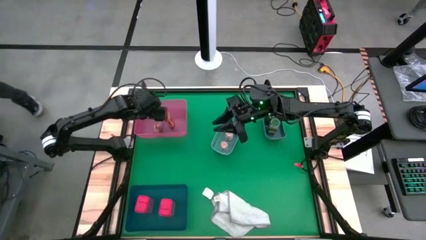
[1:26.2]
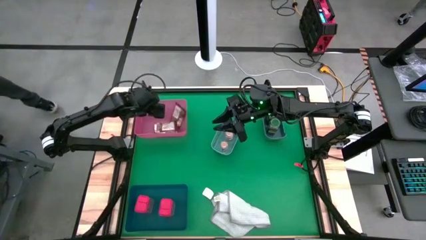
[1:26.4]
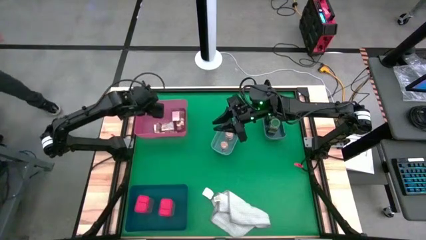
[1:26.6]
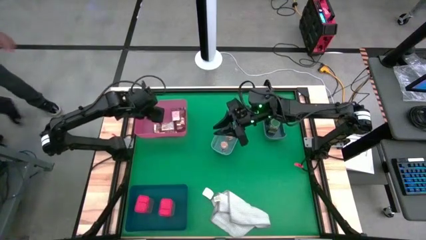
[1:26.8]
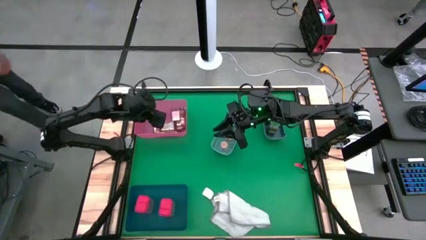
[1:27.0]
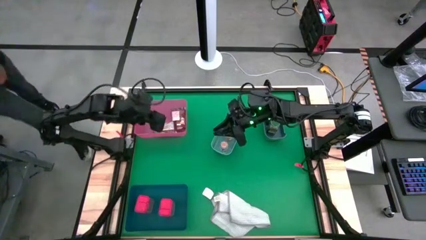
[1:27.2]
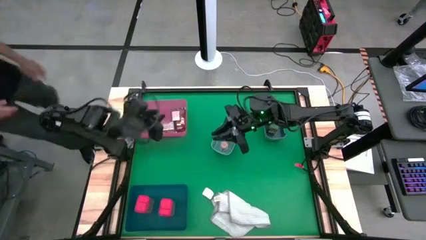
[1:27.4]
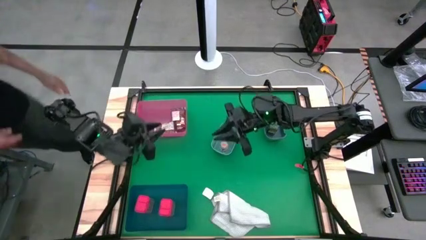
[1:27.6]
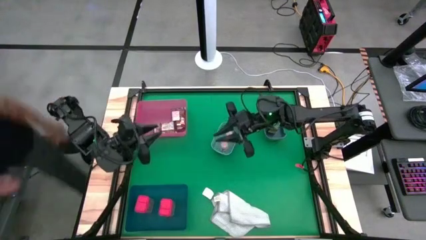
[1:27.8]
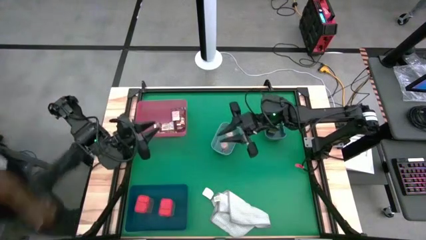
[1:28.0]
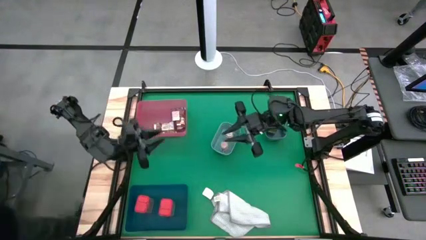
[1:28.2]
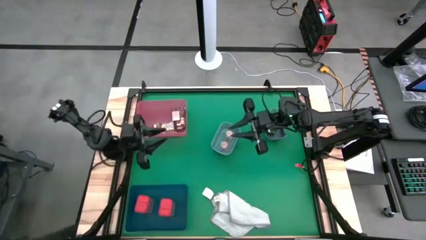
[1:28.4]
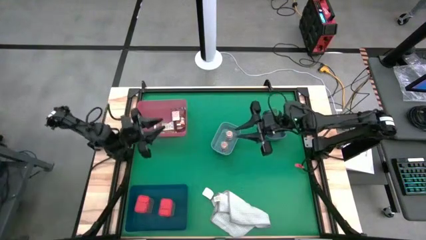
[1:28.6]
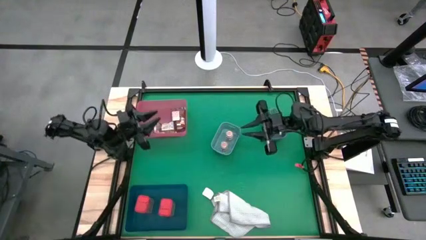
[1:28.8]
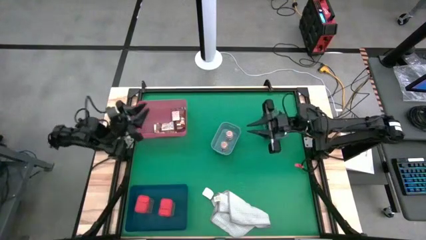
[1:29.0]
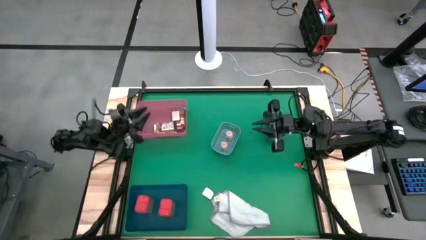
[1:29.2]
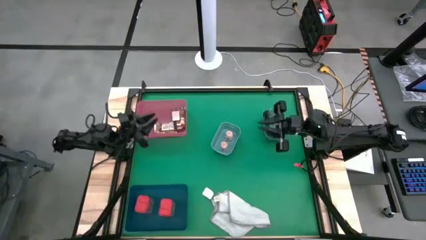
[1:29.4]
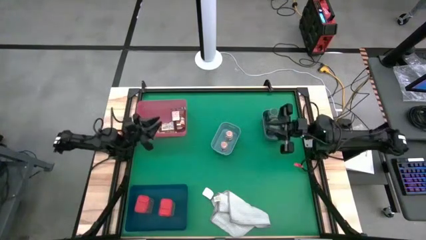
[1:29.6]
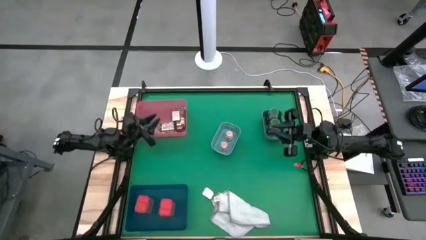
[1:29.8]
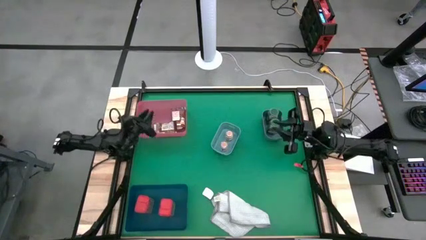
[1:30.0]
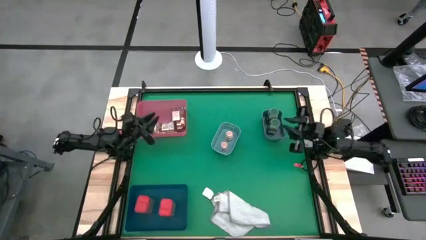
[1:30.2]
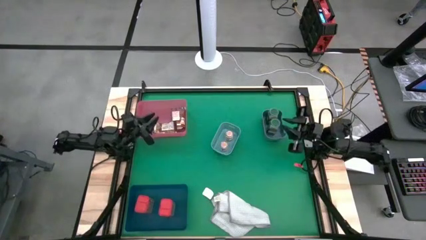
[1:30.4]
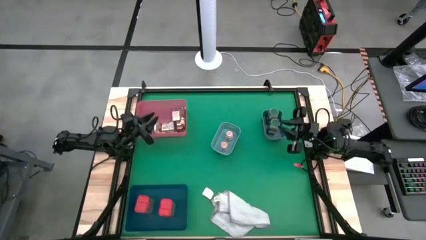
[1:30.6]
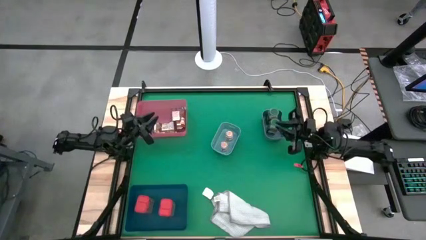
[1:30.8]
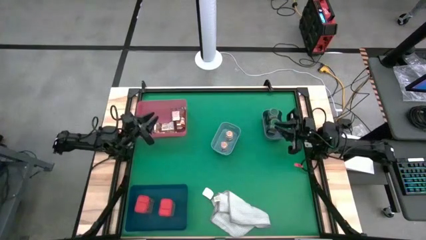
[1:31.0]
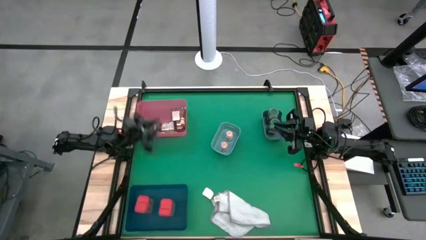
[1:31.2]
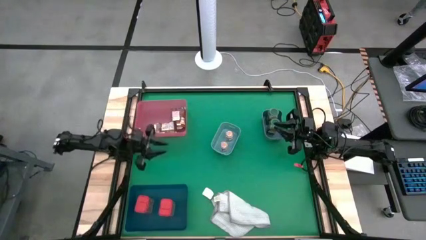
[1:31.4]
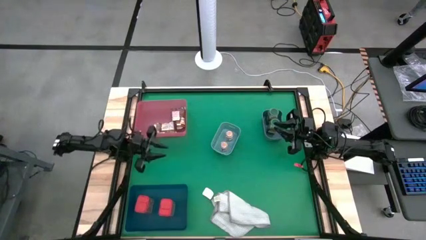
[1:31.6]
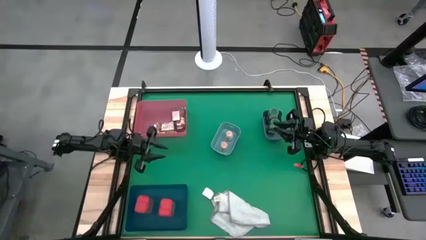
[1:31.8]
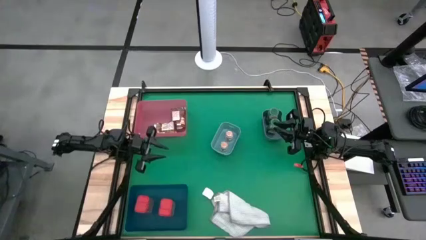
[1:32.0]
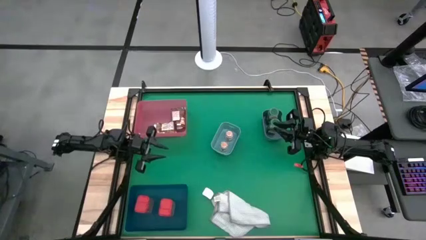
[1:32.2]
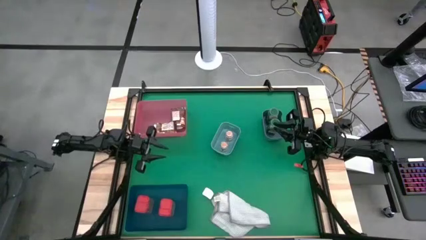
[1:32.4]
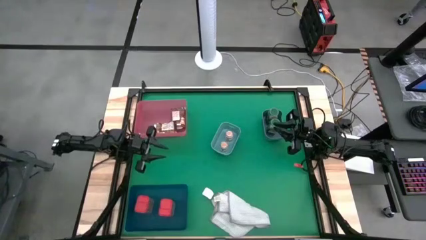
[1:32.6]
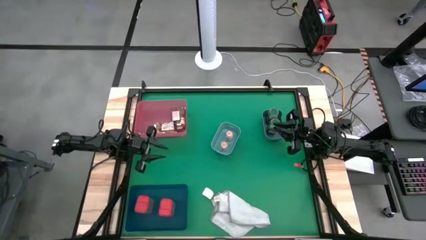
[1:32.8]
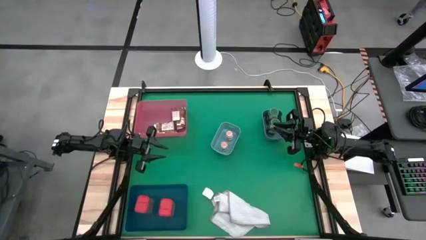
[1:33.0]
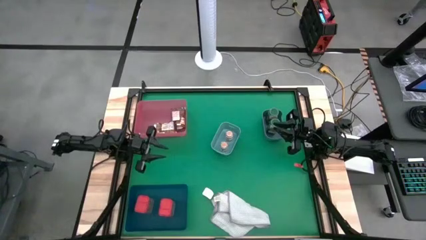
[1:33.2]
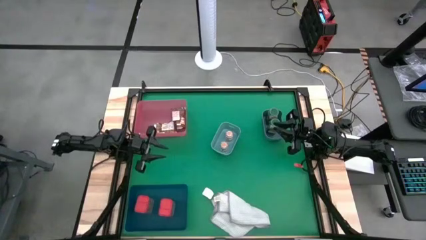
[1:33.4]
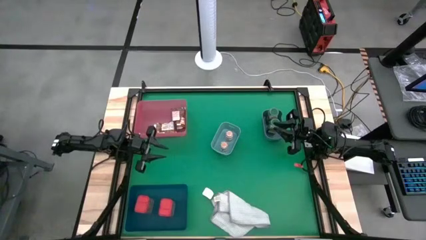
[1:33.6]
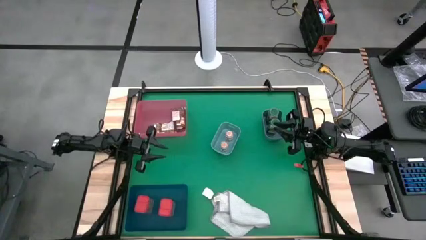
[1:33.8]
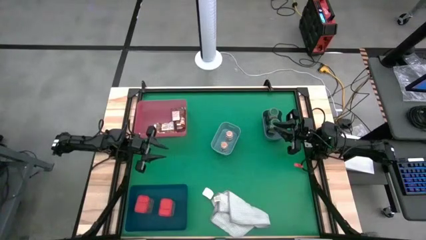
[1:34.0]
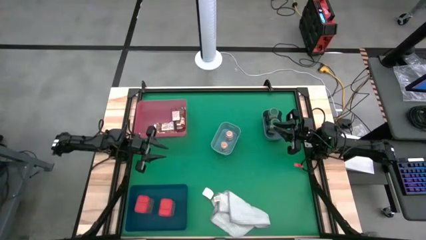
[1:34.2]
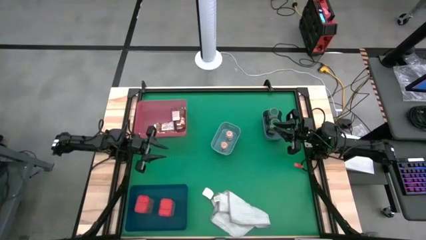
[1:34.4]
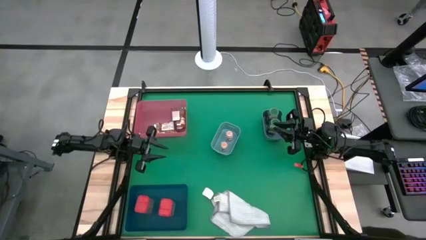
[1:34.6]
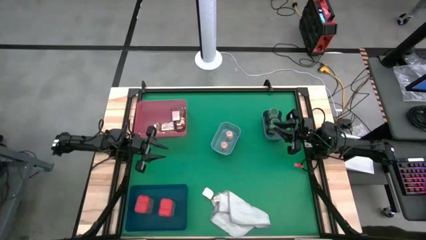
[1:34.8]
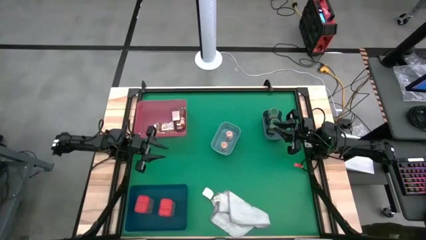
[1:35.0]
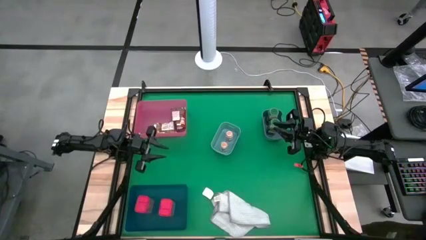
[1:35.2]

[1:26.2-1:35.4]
Task: Sort spices by type
Return to Home Position
